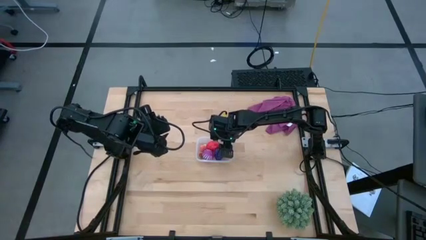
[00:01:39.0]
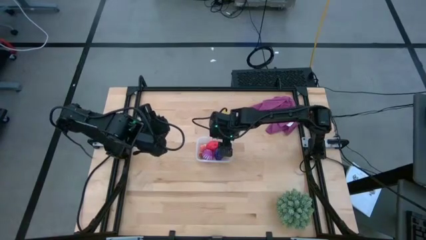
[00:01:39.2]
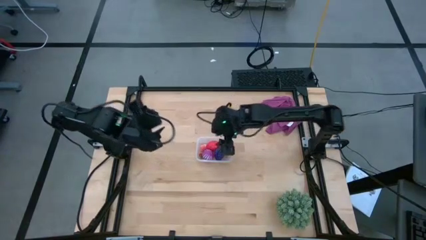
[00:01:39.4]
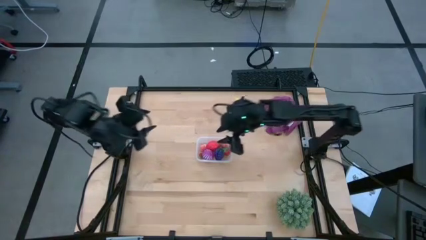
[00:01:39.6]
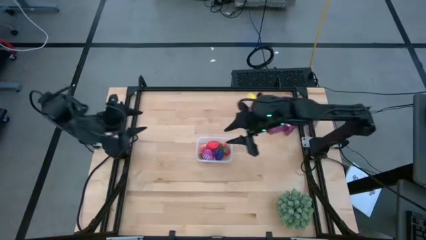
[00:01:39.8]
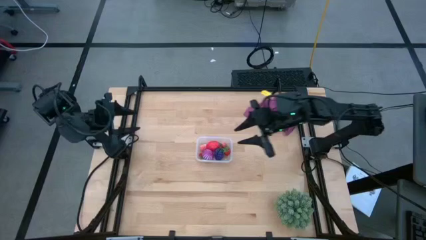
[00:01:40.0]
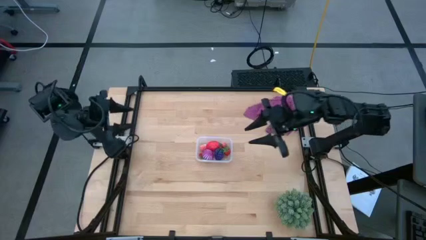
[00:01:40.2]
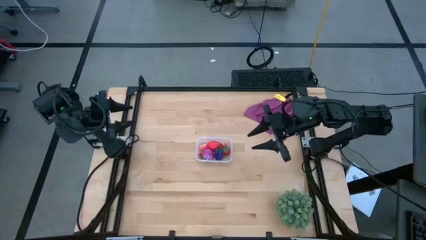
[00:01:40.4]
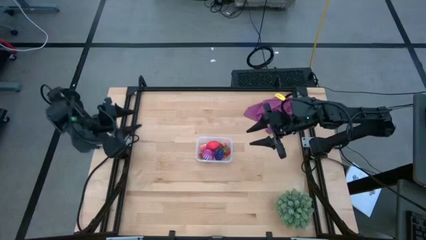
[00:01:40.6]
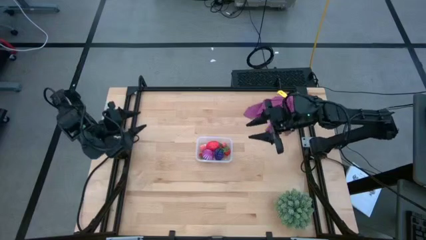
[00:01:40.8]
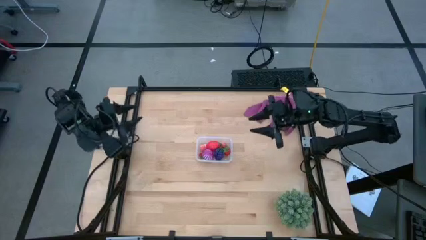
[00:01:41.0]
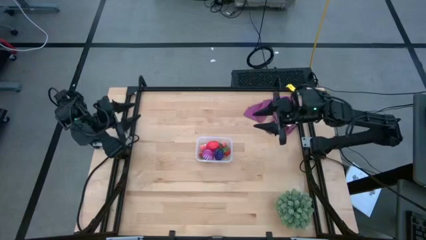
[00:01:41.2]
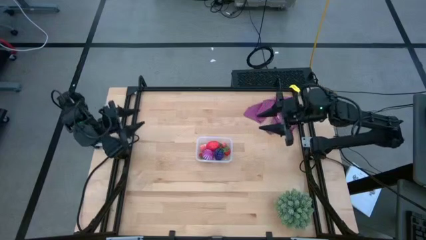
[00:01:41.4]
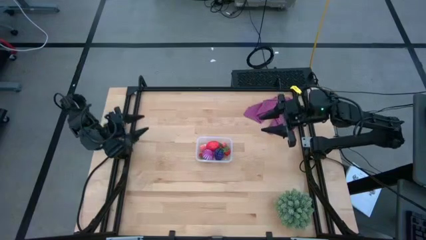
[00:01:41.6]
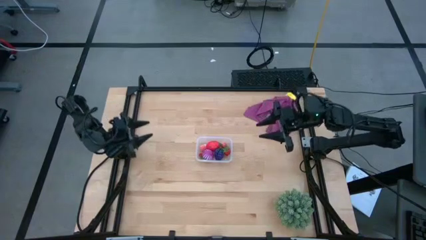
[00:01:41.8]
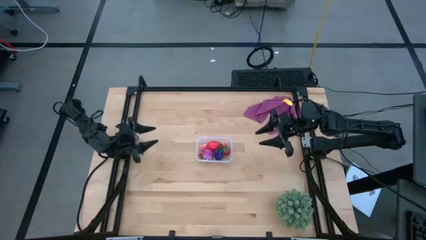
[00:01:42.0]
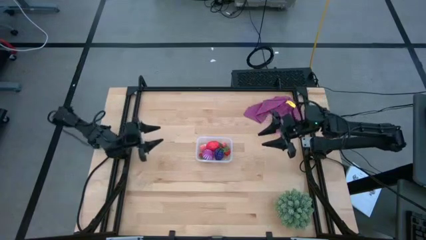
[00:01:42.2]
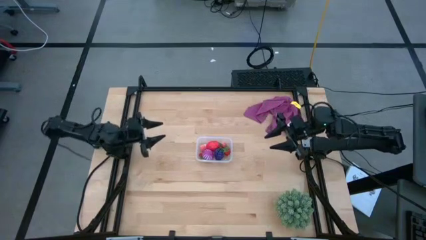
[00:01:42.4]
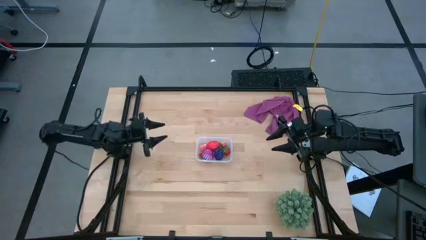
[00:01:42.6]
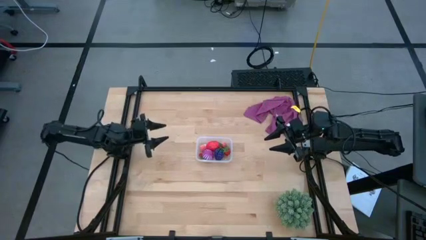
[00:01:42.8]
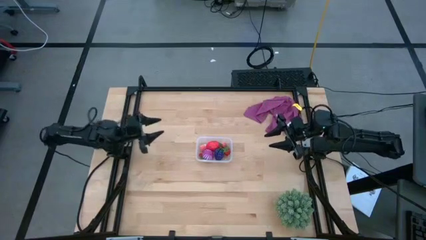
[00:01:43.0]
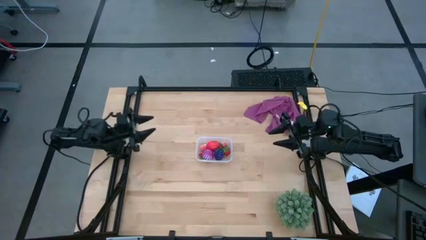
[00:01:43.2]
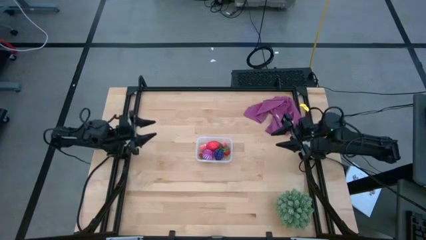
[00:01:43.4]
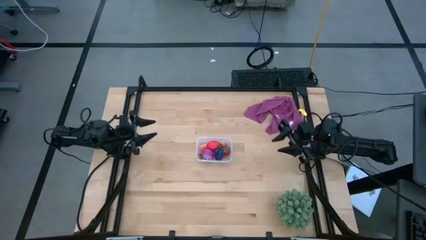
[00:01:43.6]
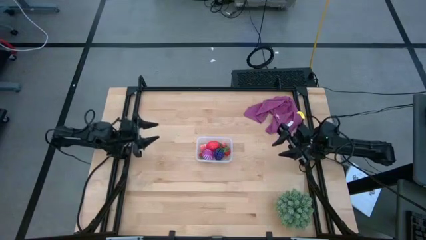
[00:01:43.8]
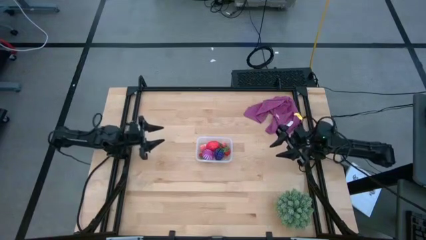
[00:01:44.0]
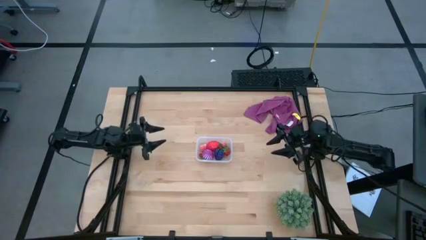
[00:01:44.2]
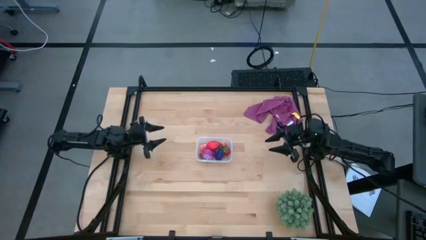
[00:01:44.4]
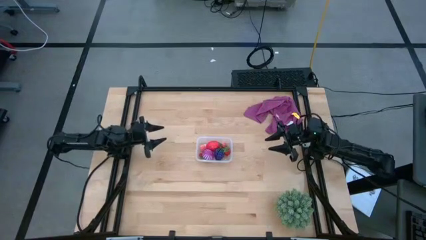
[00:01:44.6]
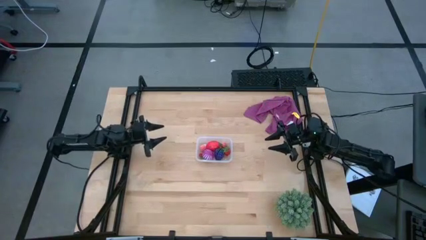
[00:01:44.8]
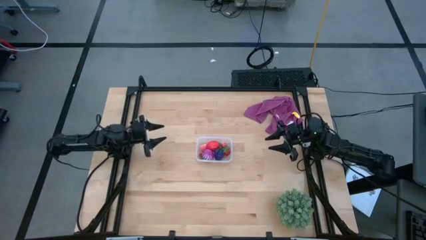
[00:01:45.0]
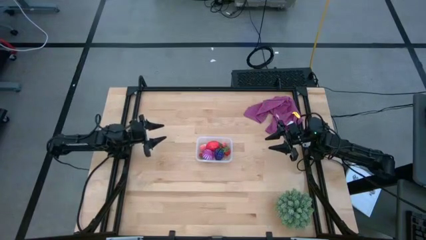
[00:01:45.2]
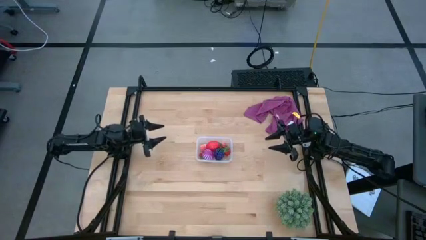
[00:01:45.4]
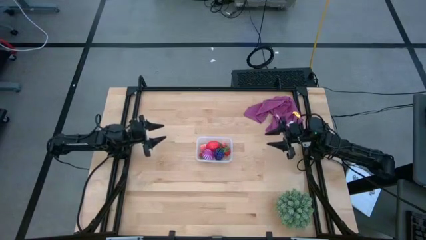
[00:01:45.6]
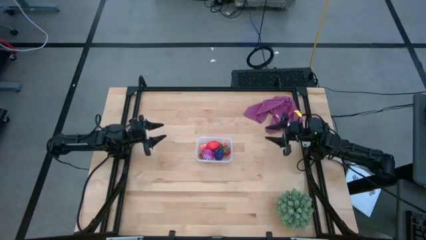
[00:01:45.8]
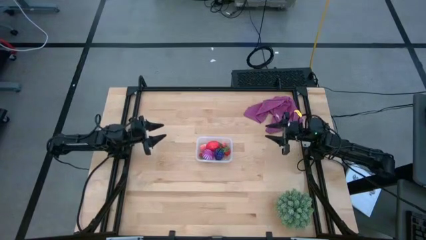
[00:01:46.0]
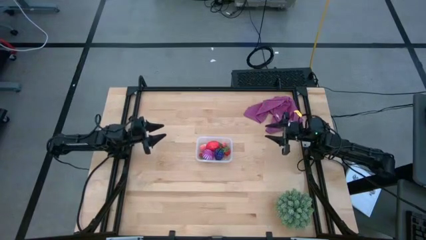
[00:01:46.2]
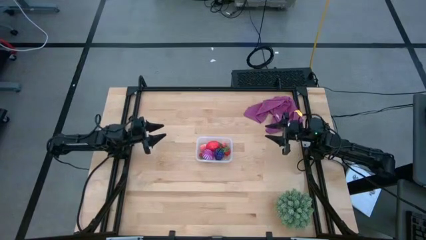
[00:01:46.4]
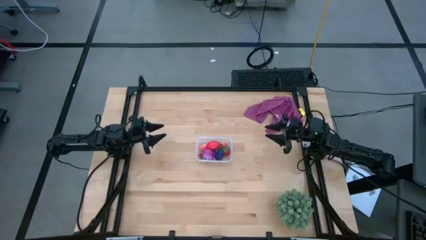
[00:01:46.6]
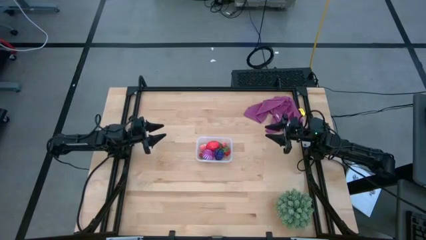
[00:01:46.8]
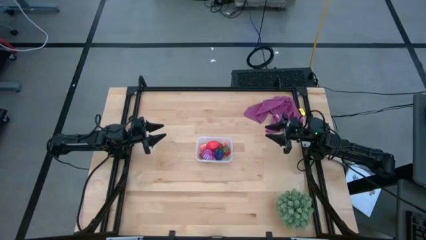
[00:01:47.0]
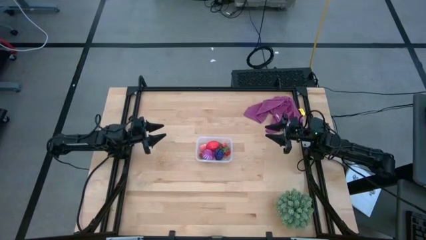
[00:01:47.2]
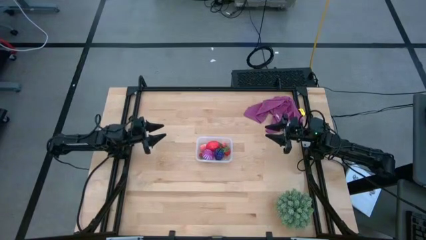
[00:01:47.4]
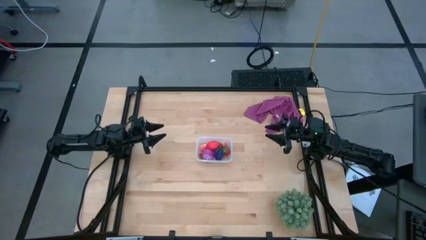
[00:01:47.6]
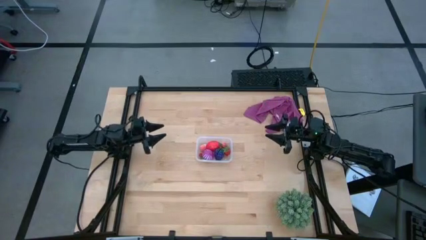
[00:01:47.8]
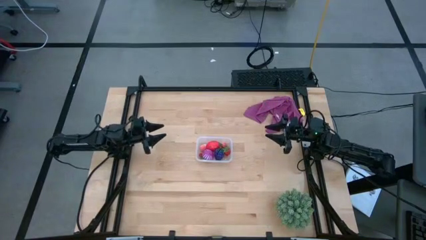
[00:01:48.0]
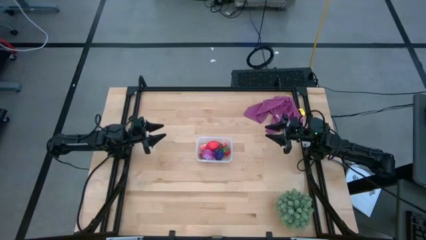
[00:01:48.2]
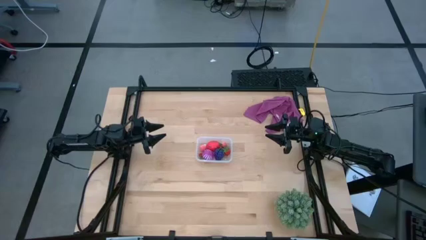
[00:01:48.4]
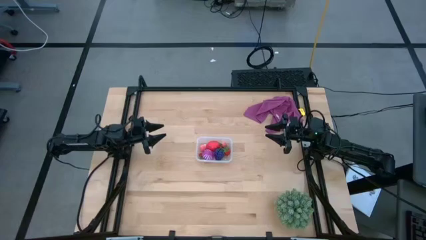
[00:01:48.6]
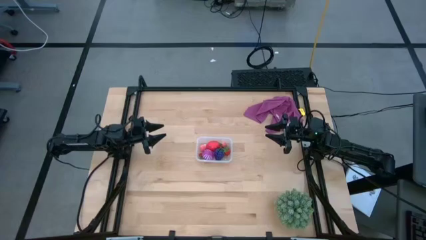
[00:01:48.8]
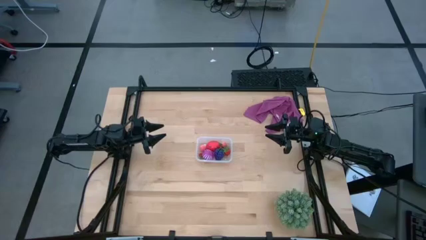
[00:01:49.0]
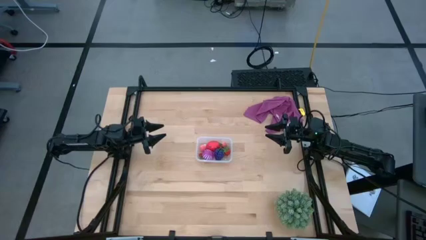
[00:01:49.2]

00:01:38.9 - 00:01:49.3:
Task: Pick and placing Produce into tupperware
Return to Home Position
